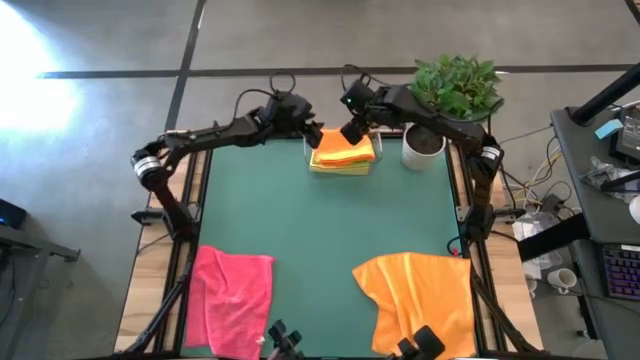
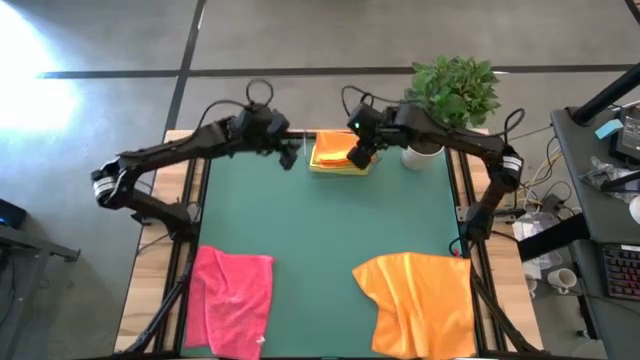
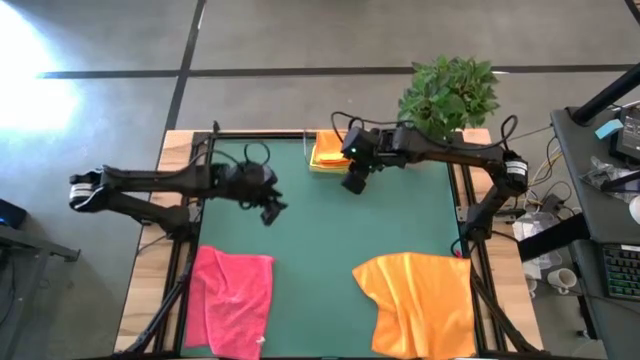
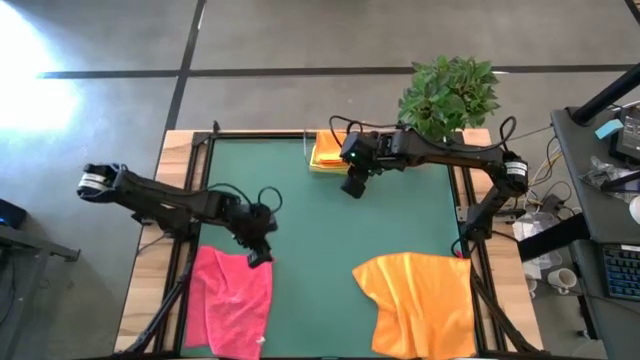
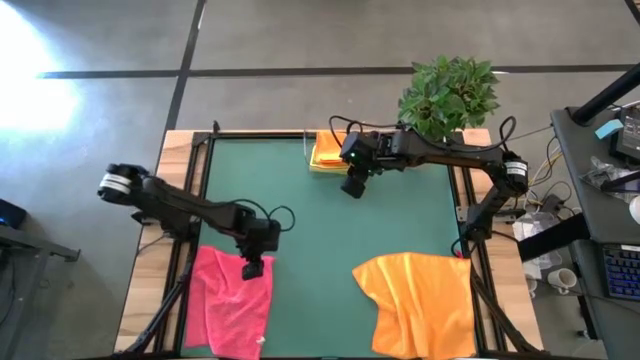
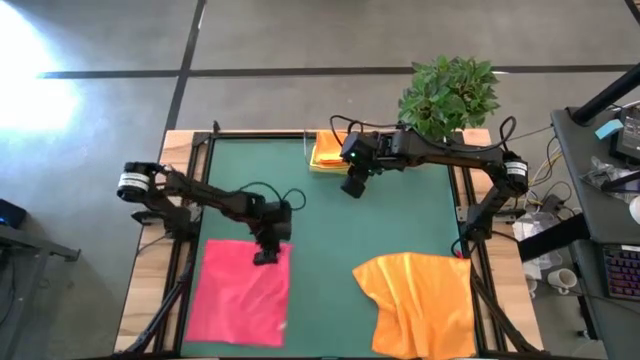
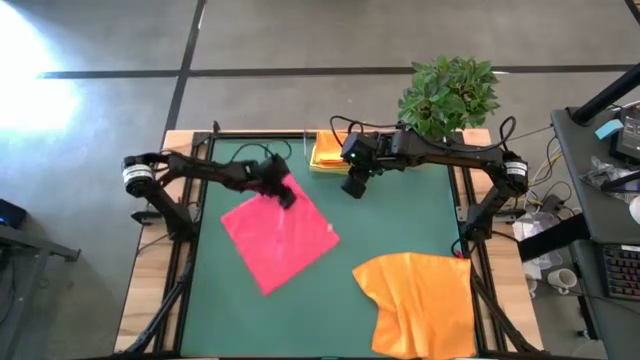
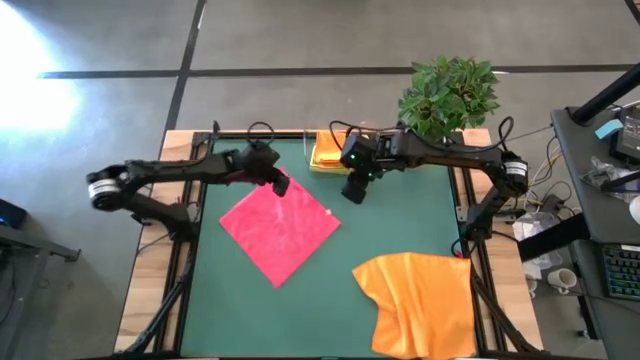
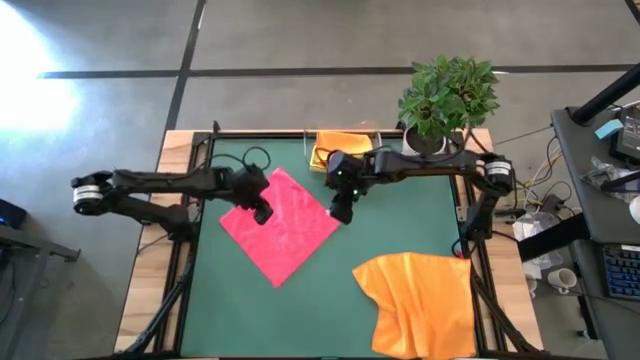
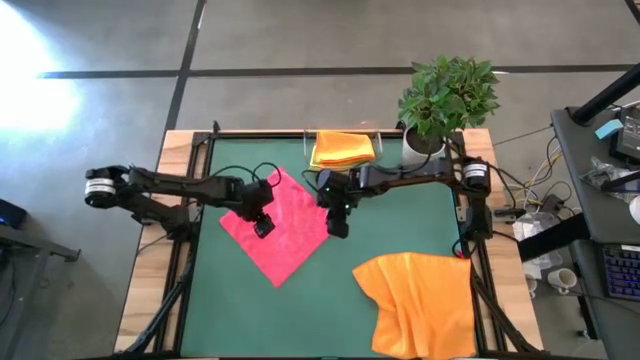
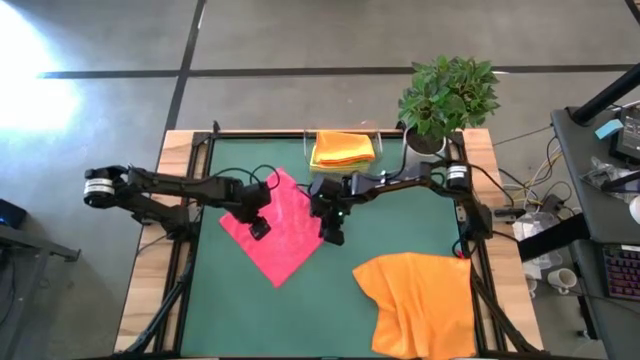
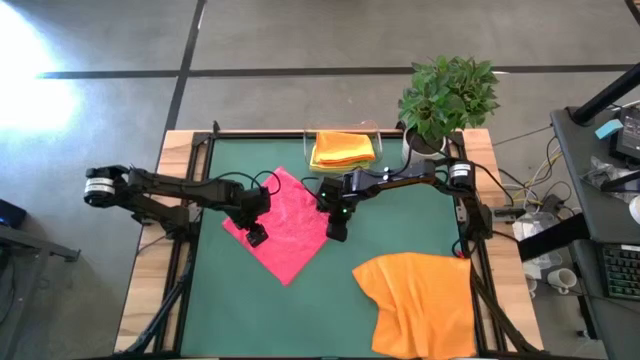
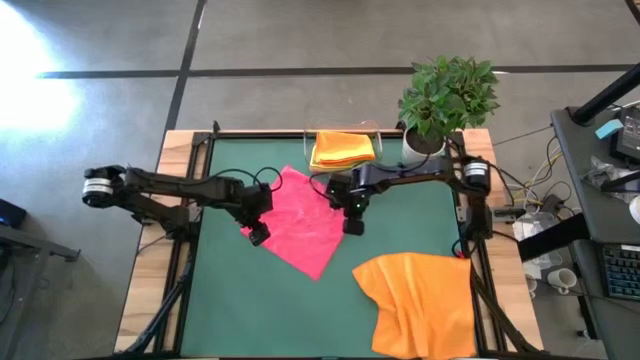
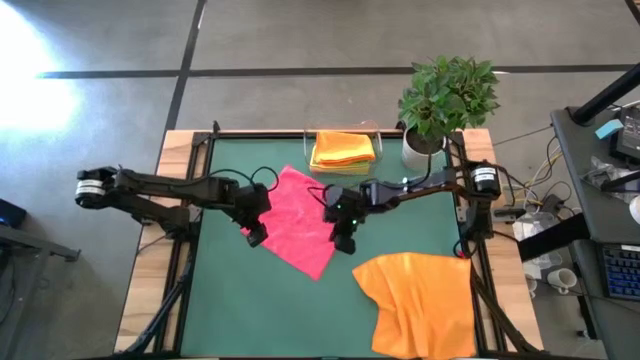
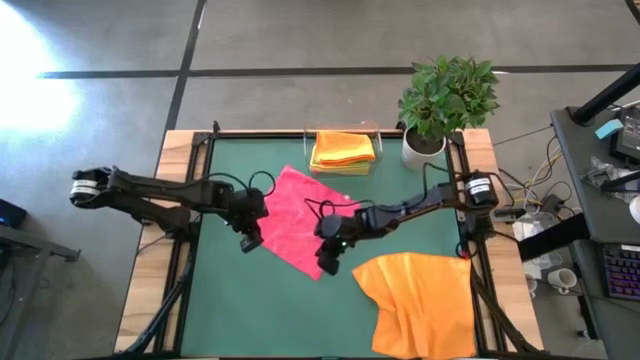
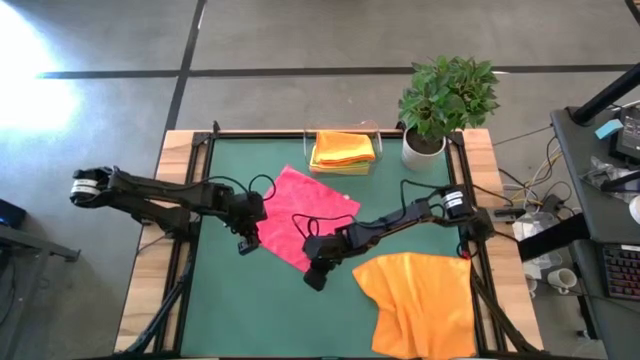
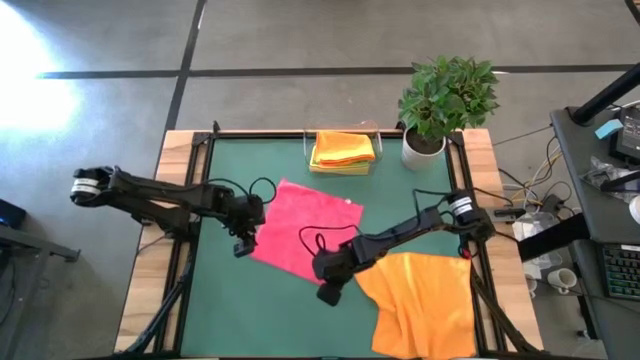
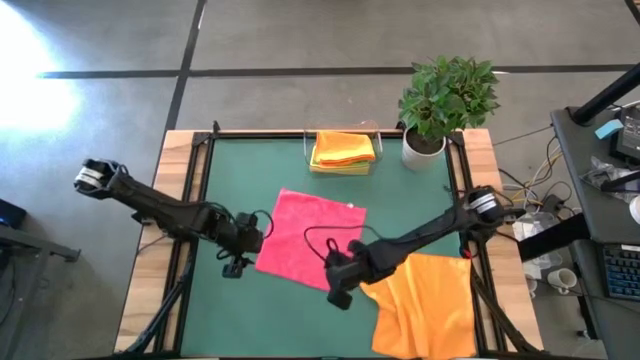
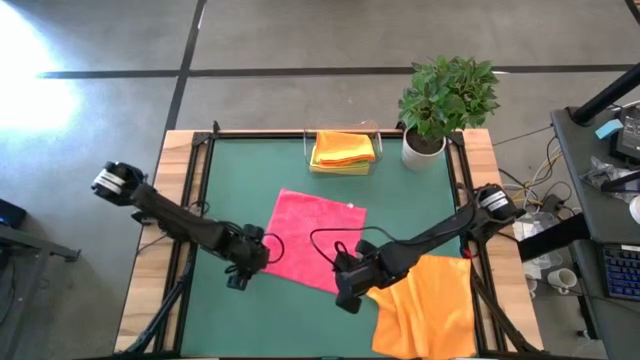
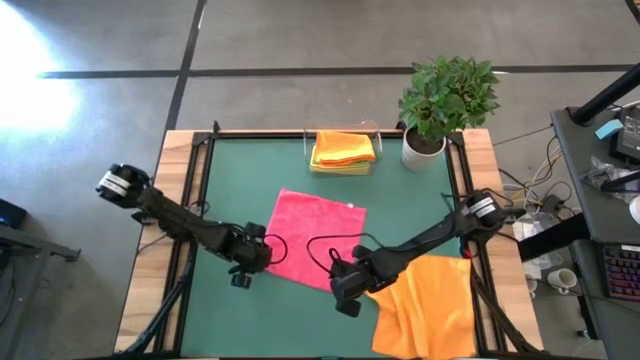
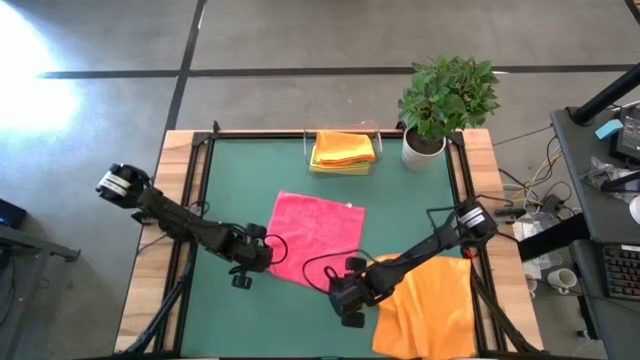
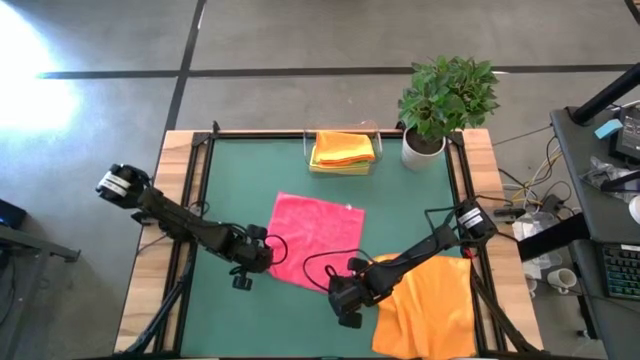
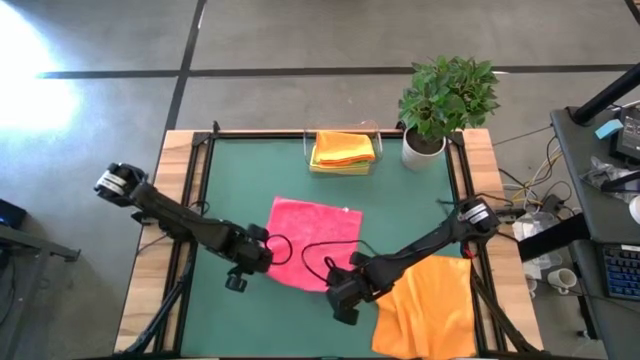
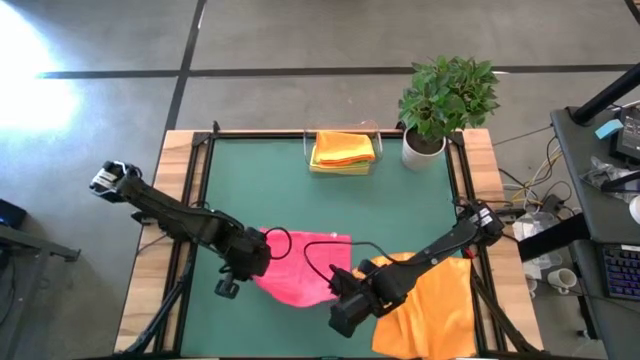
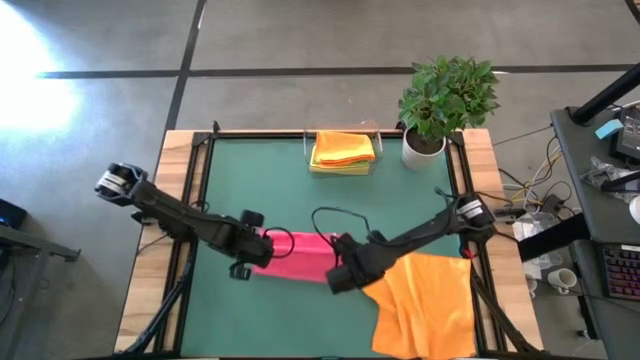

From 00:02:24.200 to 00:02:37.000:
Task: Fold microfiber towels
Fold the pink towel

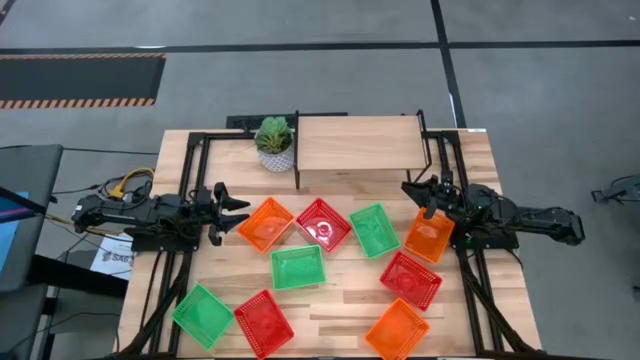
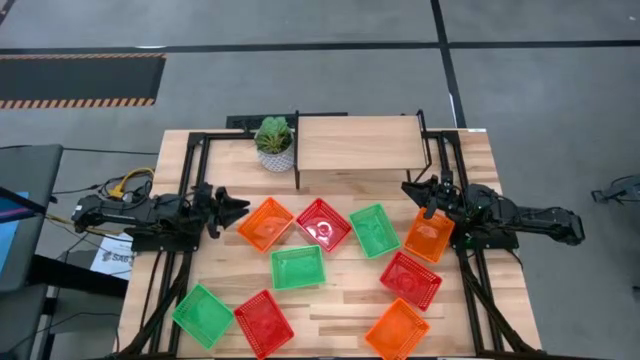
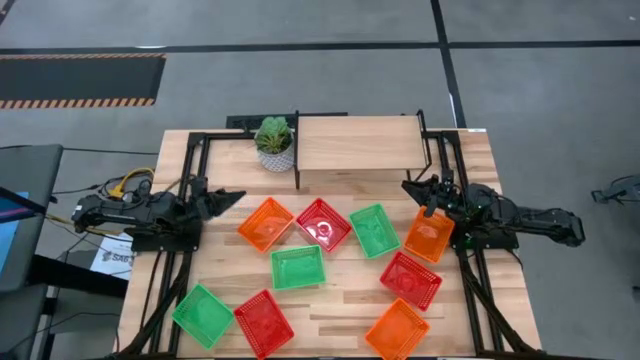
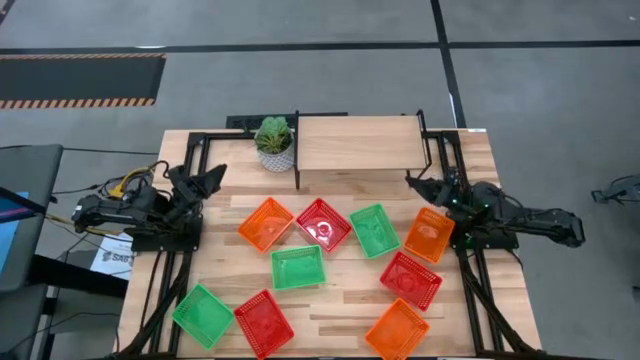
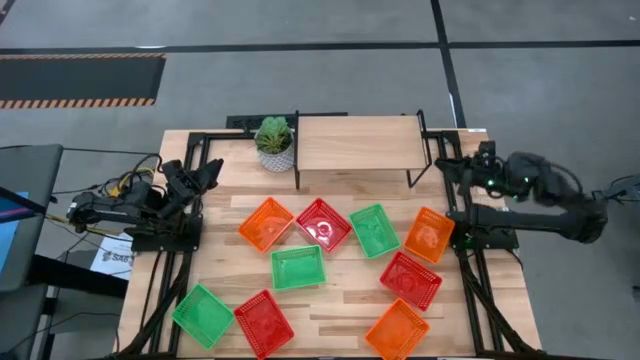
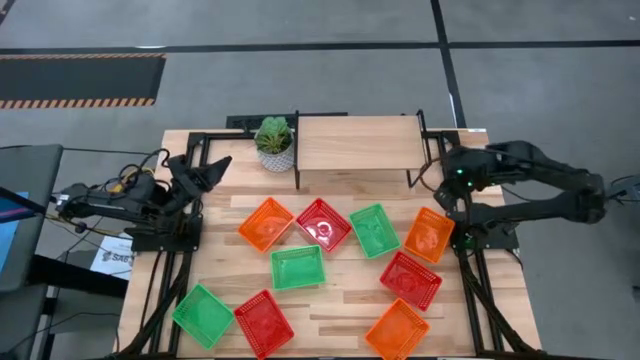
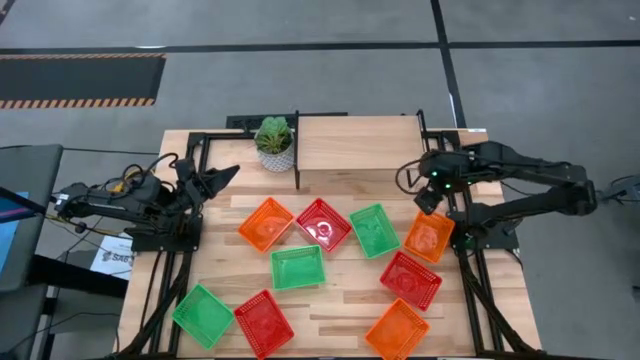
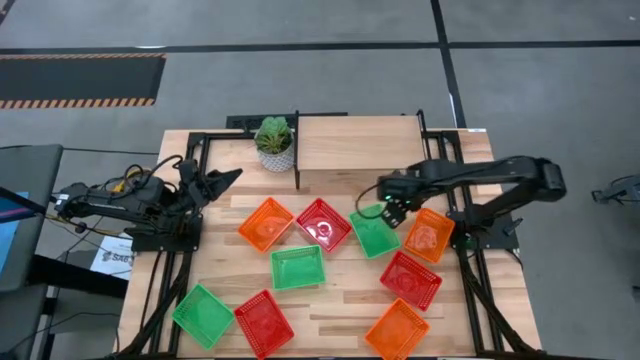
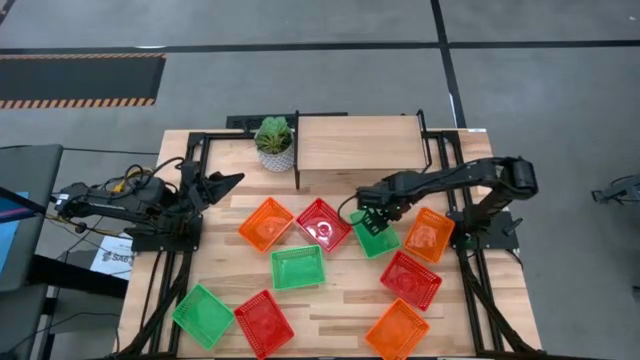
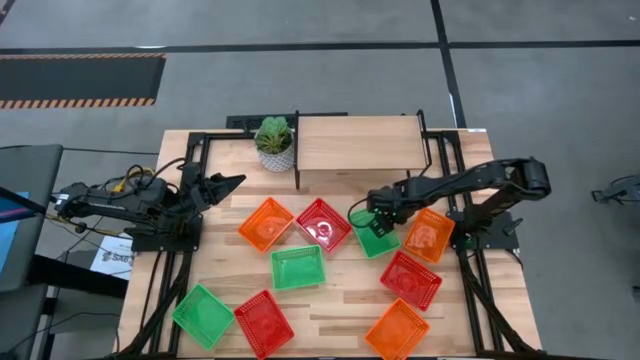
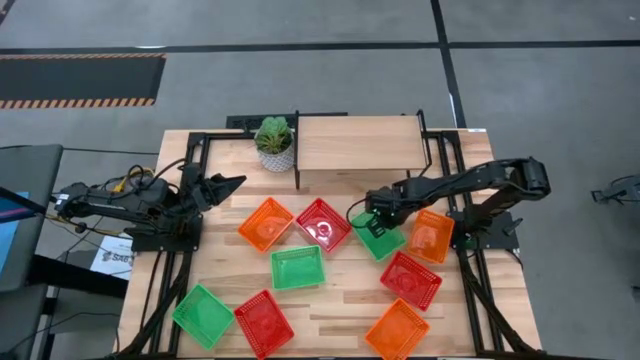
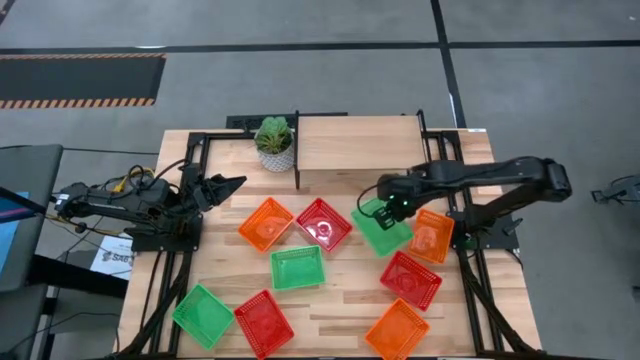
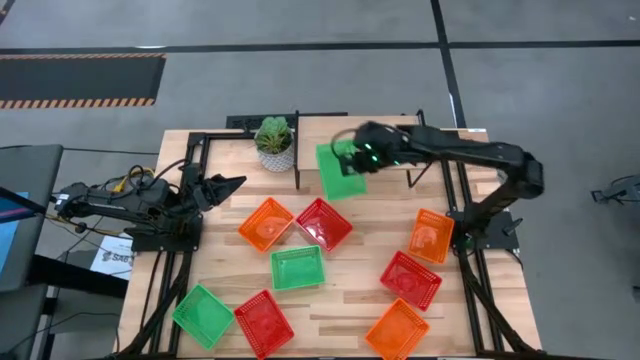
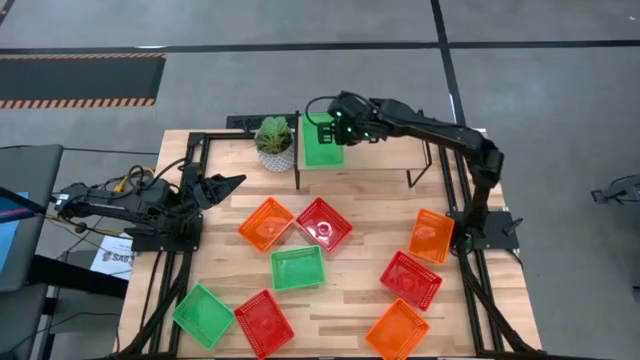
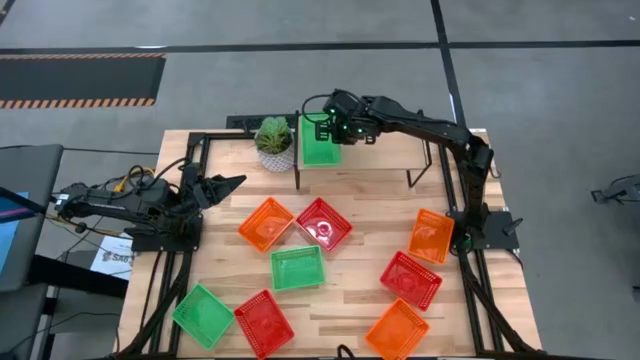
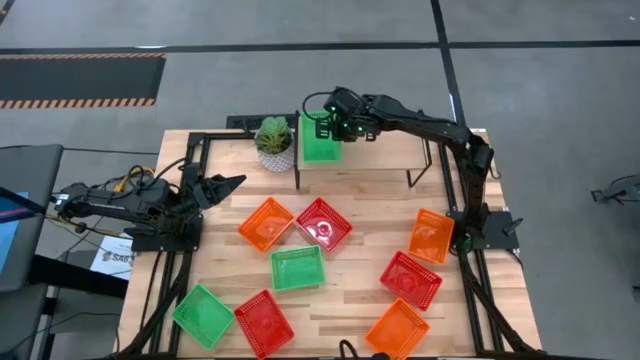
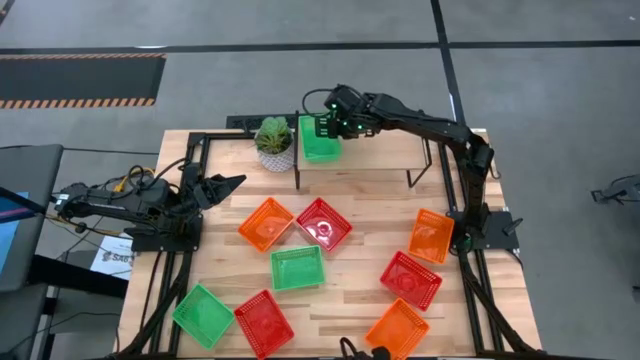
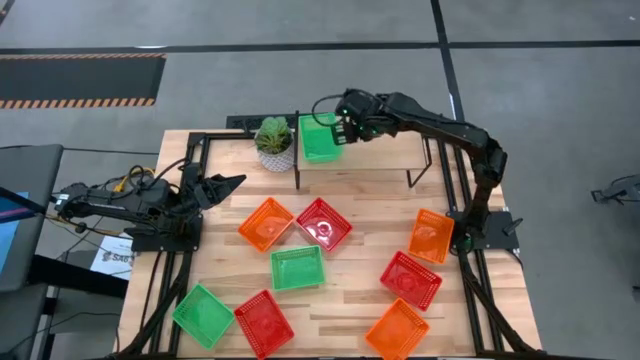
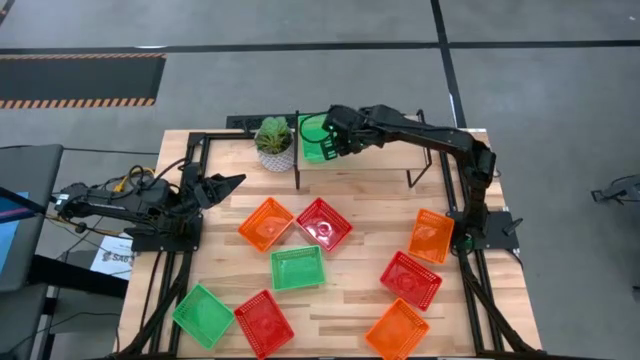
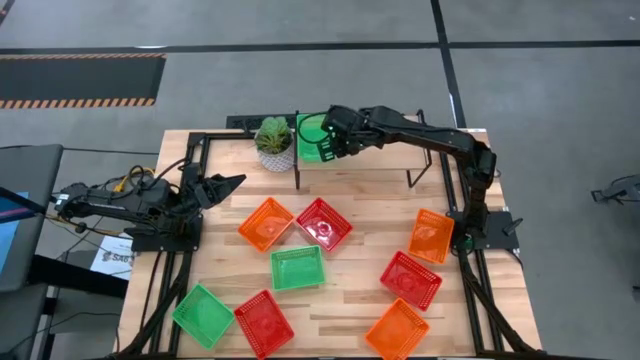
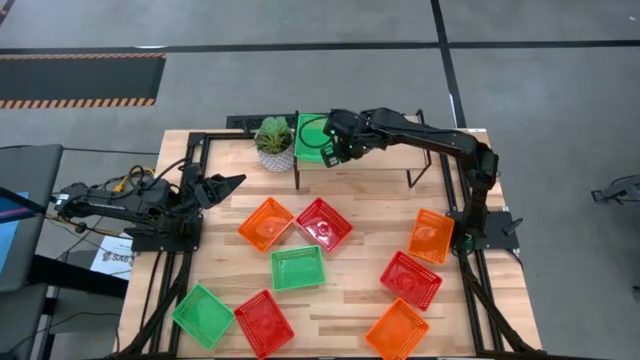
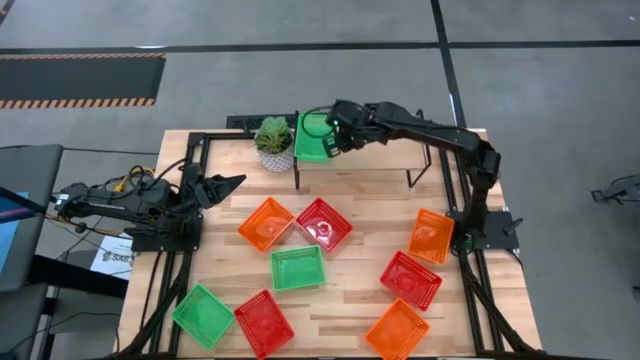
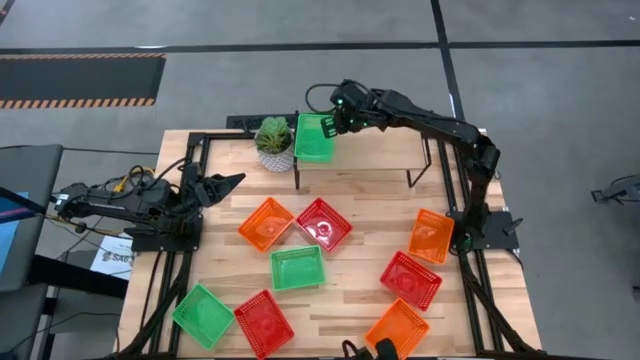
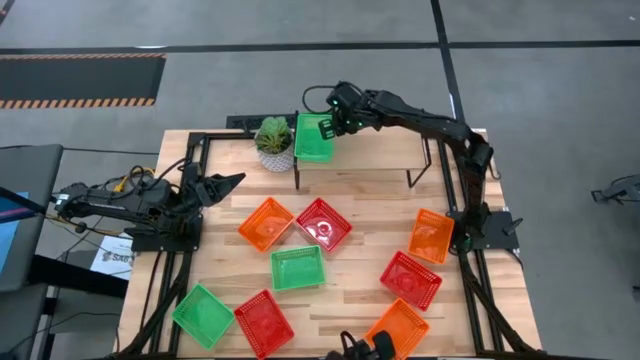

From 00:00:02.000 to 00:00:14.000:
Task: Stack baskets on shelf by color
Put the top green bin on the shelf
